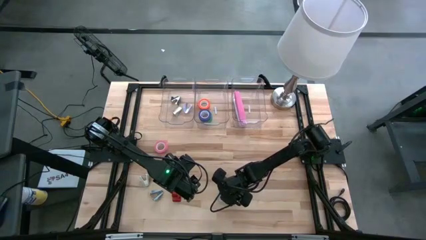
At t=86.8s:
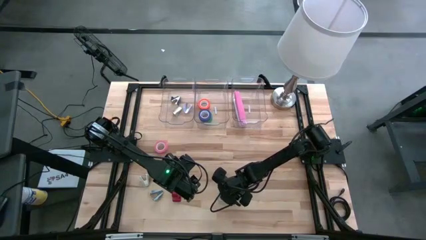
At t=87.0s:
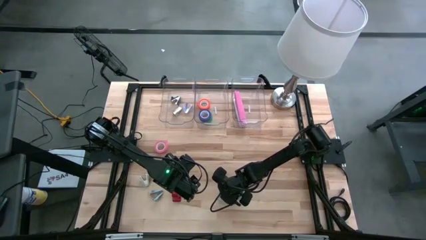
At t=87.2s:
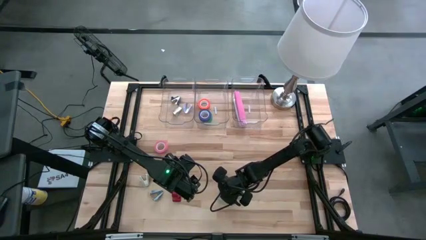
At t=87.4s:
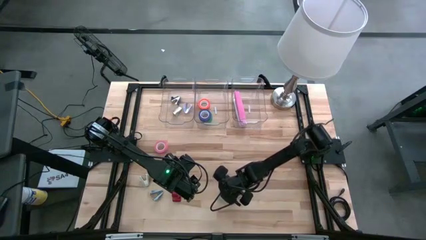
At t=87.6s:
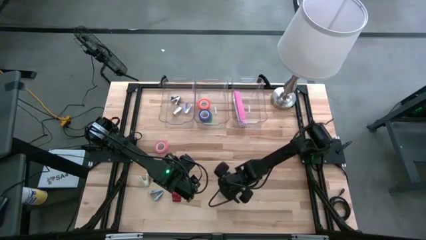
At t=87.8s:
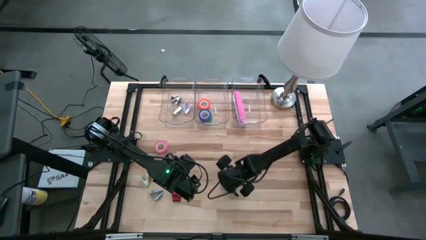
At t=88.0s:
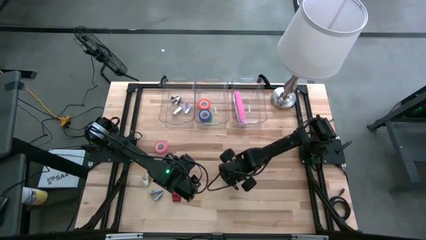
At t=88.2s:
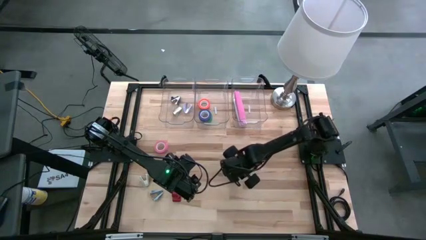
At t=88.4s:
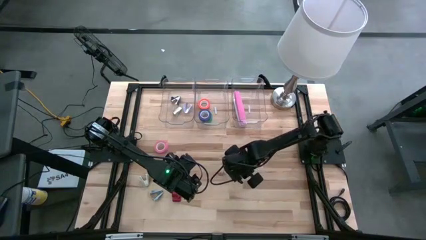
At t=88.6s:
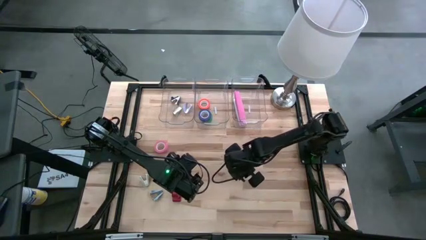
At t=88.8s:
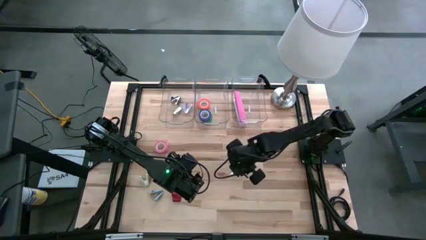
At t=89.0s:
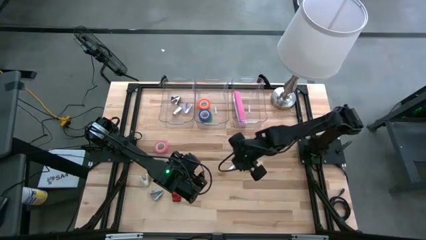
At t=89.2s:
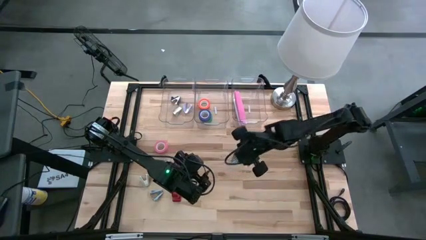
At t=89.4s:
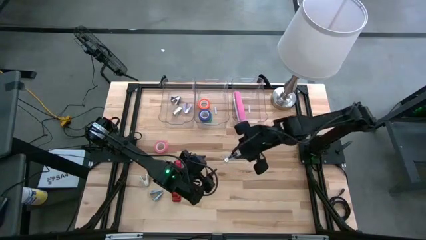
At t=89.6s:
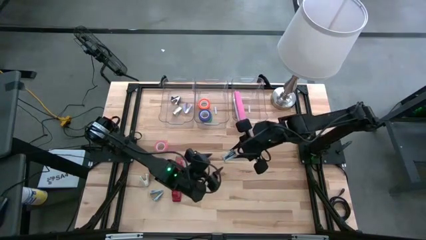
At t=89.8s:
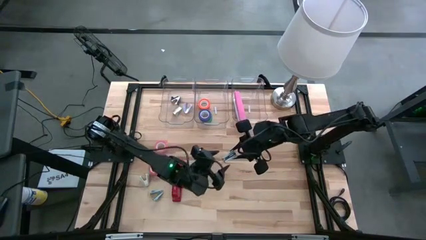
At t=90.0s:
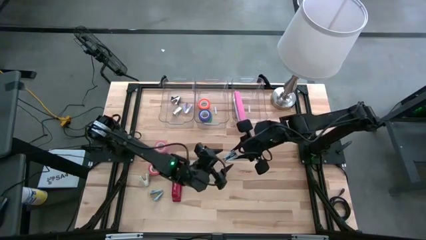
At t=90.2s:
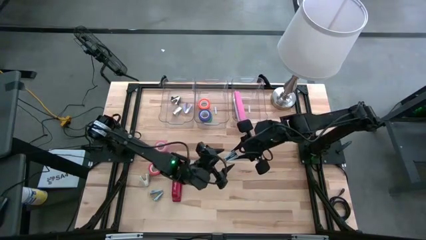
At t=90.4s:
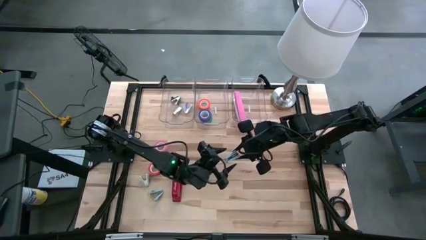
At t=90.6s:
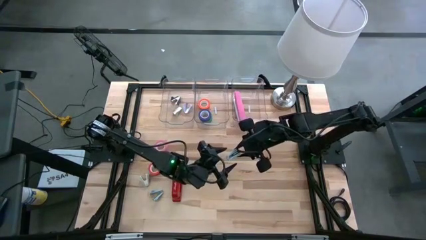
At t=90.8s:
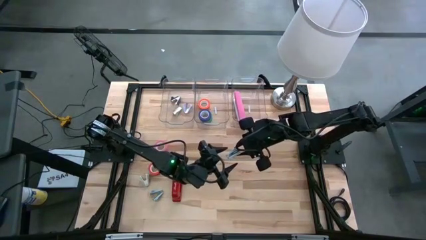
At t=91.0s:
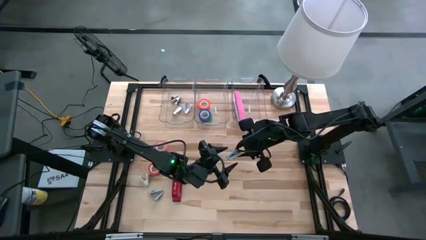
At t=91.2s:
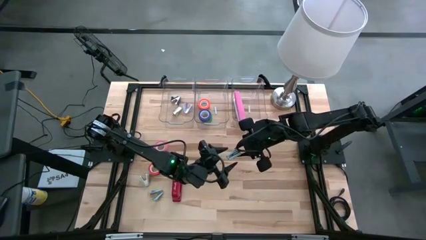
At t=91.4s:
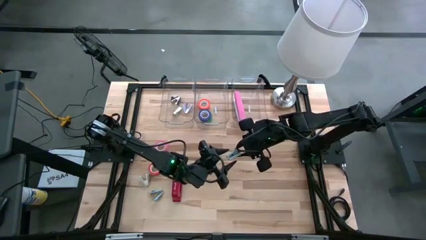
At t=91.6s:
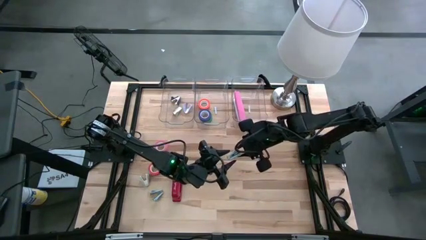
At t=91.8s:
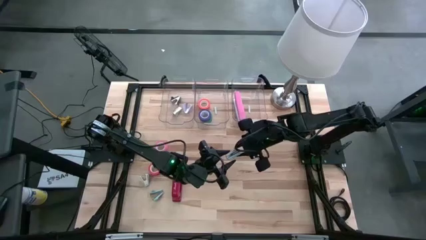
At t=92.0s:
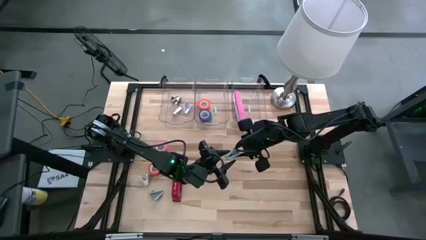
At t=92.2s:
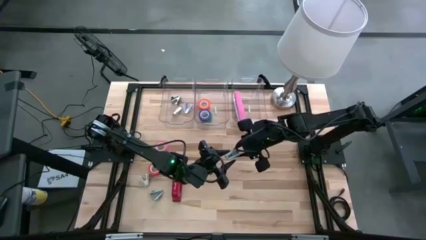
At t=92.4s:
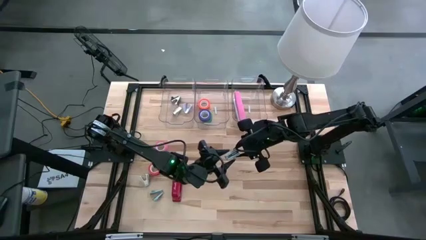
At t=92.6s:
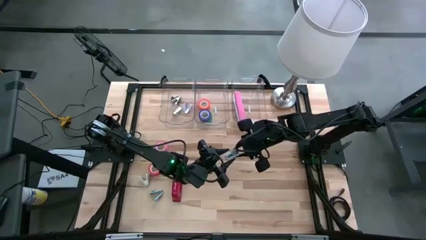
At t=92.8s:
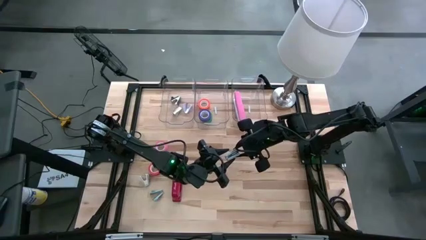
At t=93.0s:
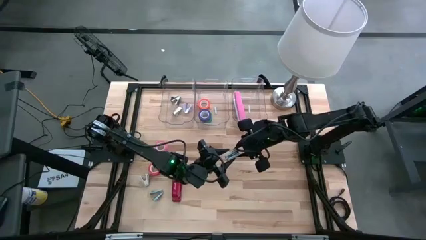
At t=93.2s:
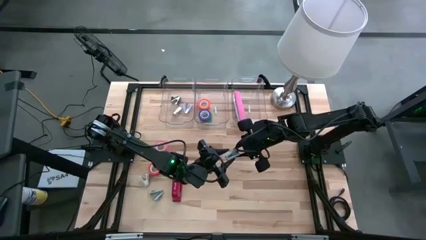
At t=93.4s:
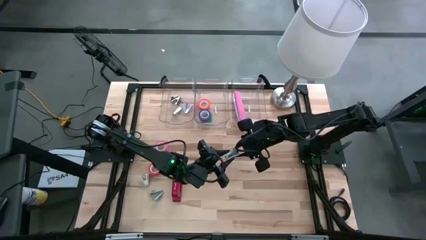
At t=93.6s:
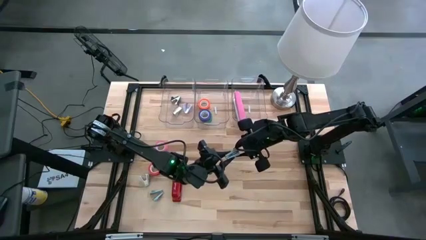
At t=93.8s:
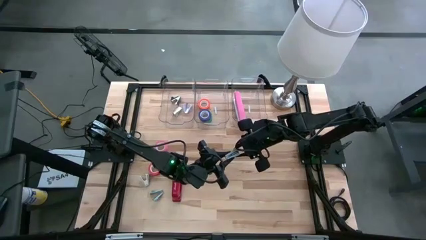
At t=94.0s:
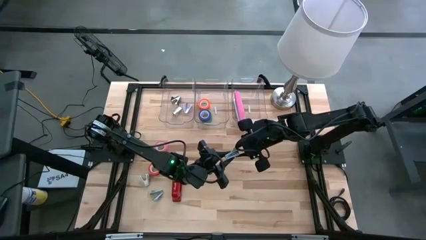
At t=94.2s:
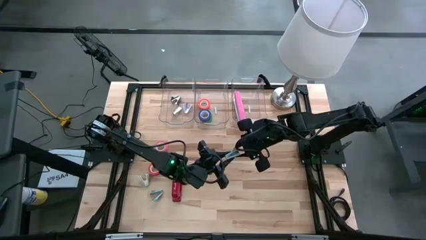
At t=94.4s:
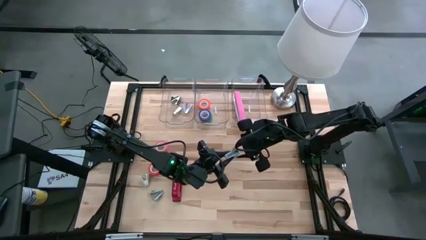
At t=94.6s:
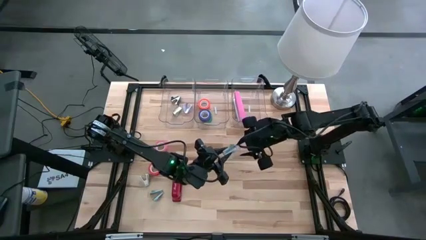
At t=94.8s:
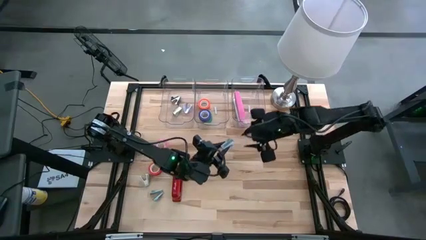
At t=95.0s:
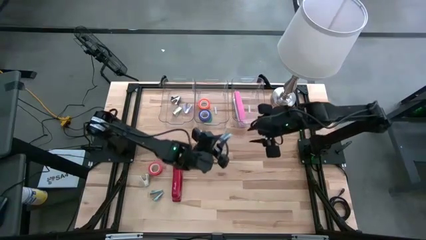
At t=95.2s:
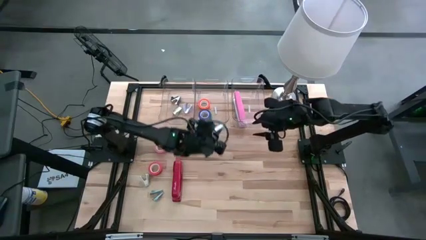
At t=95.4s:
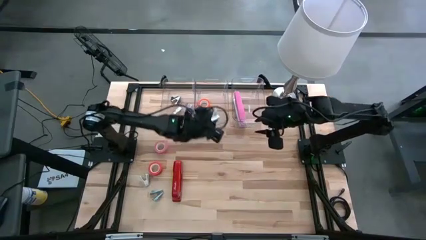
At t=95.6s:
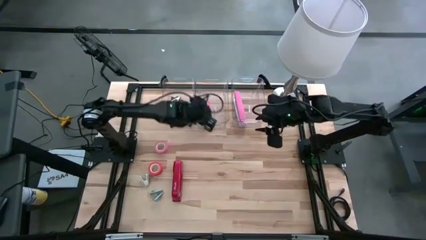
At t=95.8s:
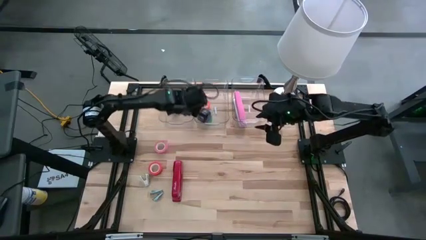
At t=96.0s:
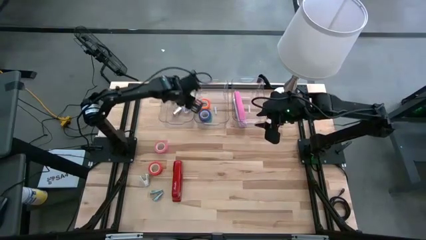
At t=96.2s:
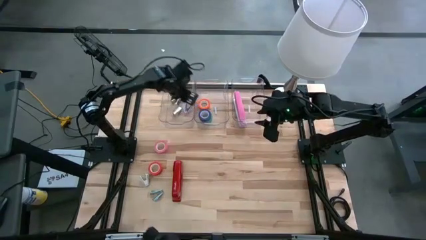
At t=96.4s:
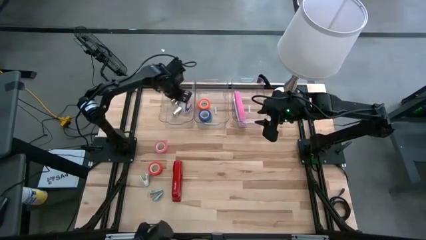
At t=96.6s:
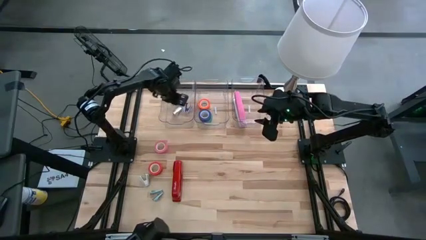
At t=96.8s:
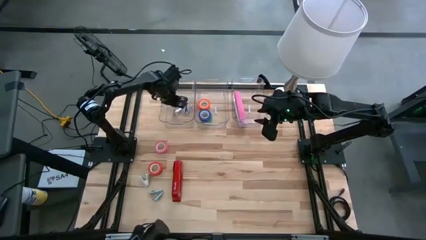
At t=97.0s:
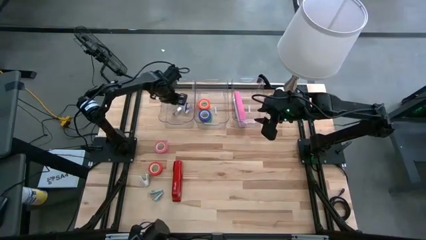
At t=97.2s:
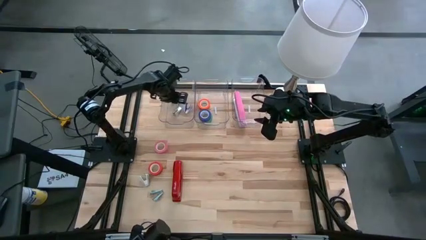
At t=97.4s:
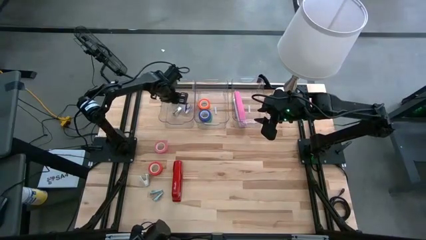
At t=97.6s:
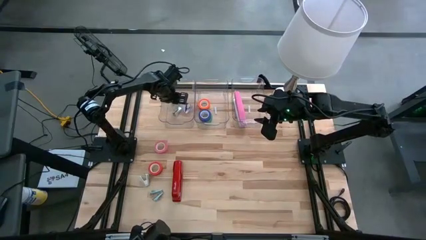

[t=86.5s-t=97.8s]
Task: Pick and place Stapler, Stapler remover, tape
Put the right blue staple remover into the left transparent bin

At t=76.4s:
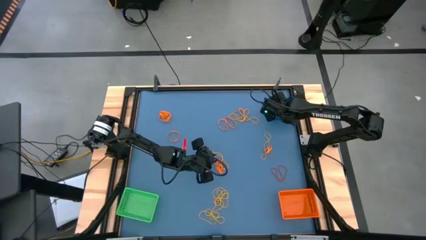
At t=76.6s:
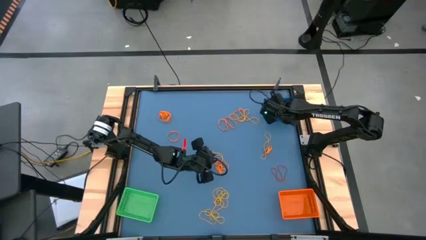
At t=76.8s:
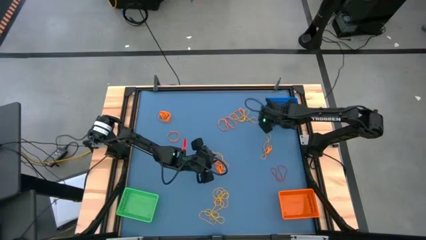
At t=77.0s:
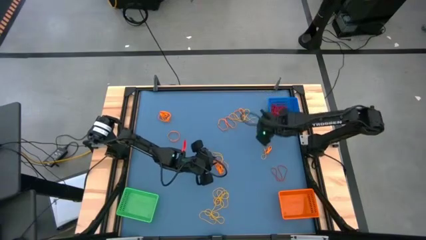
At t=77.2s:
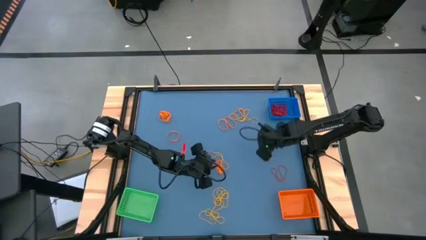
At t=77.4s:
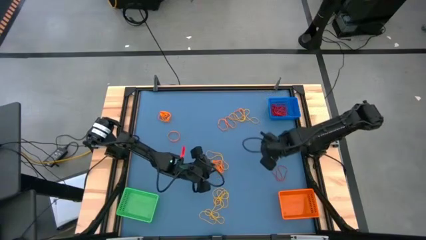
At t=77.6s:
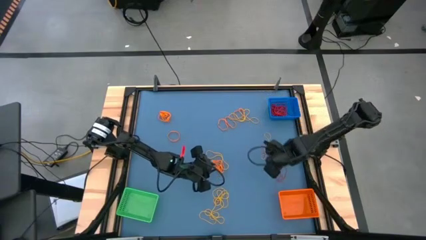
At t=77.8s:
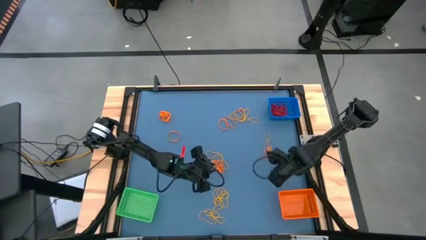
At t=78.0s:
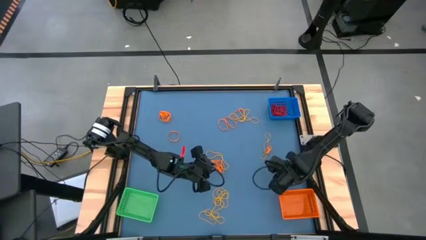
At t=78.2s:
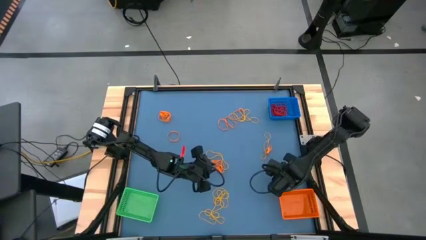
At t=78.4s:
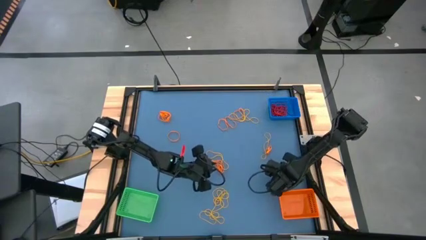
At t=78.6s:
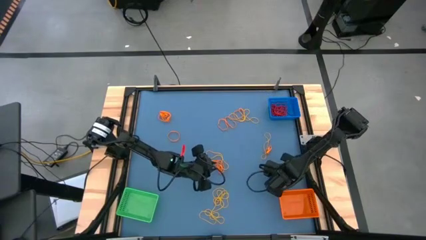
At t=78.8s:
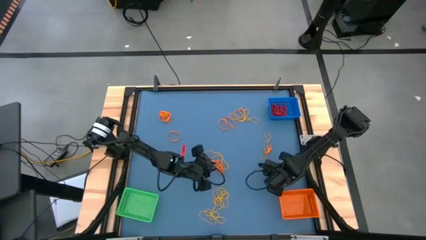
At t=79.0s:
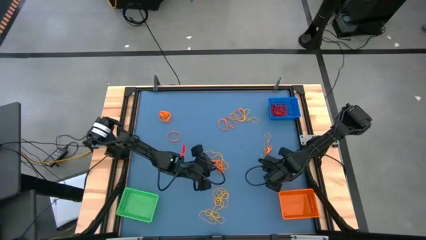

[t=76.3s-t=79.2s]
Task: Sort rubber bands into baskets
Put the red rubber band into the blue bin

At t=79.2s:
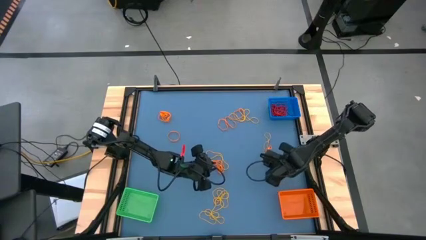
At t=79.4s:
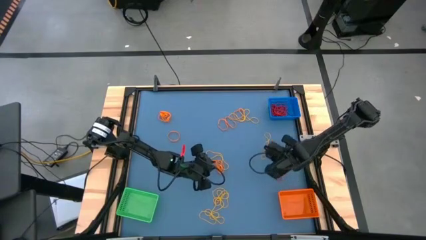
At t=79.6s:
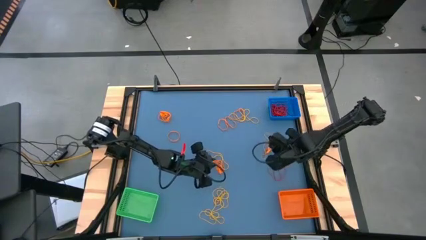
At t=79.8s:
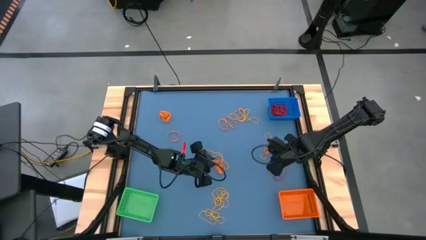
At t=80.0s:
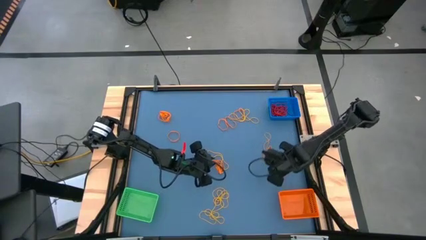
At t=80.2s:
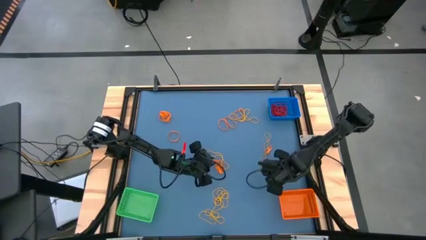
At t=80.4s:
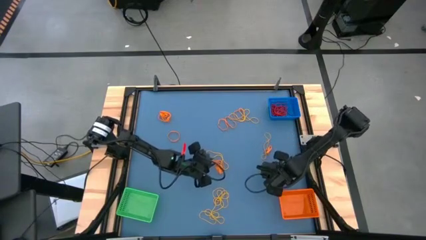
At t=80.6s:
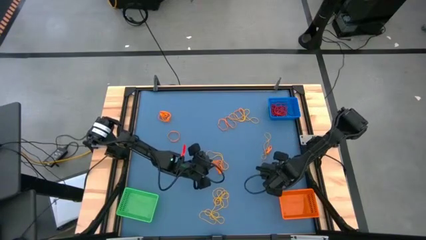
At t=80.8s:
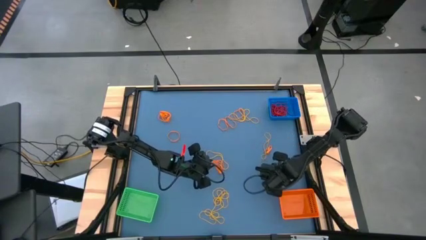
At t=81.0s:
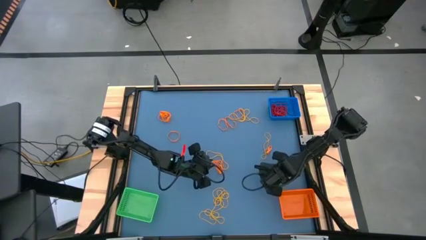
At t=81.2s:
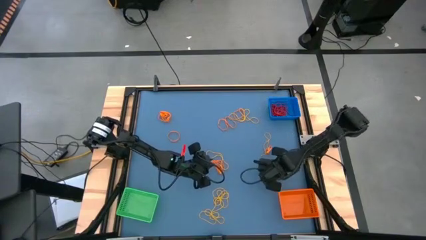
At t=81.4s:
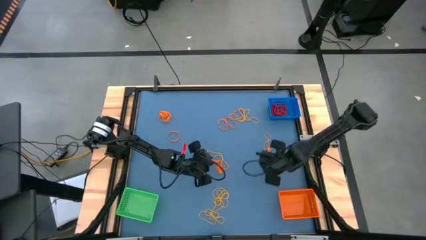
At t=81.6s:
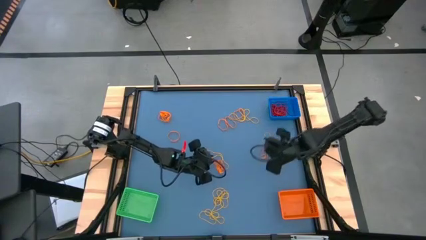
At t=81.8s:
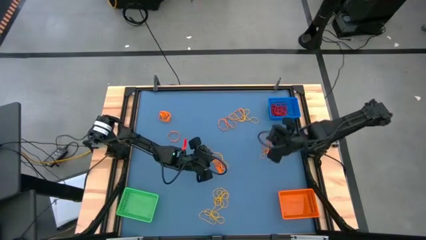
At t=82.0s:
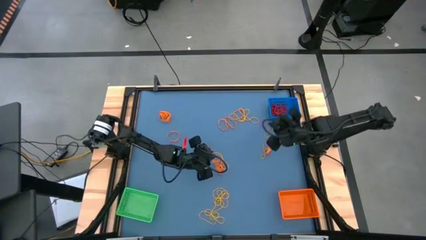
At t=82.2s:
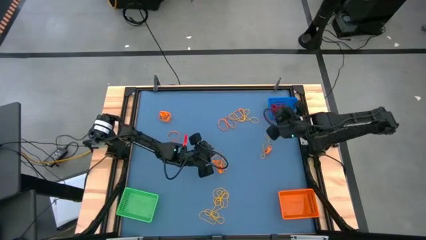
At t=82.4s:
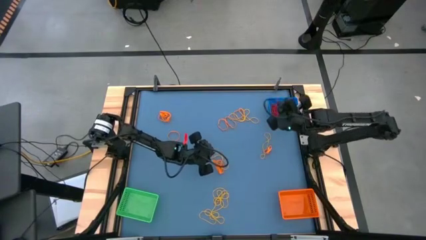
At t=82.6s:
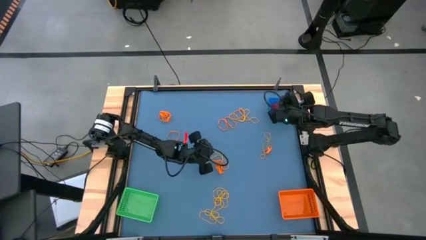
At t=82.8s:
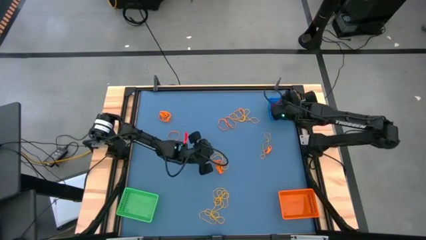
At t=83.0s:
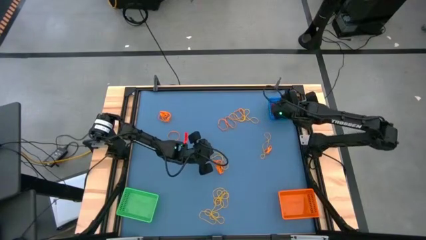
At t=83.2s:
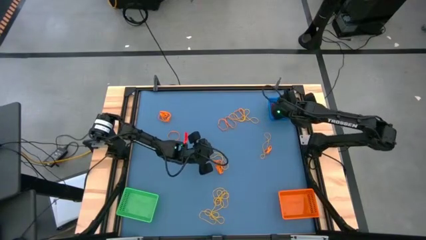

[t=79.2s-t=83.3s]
Put the red rubber band into the blue bin
